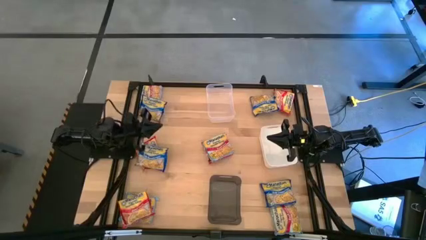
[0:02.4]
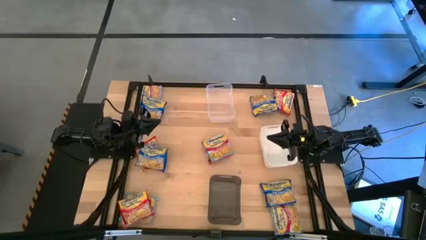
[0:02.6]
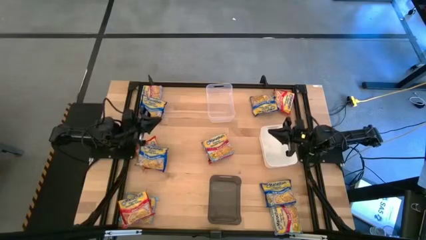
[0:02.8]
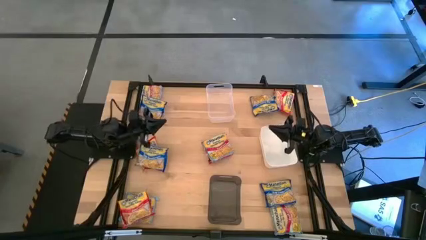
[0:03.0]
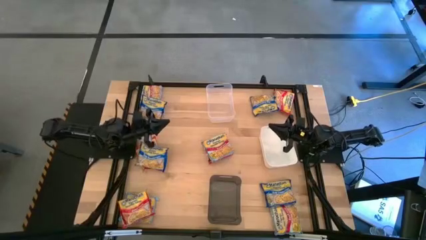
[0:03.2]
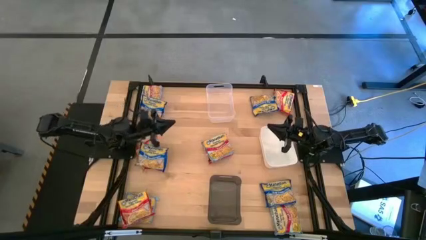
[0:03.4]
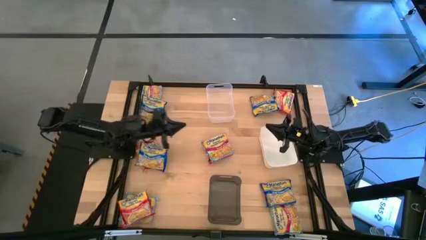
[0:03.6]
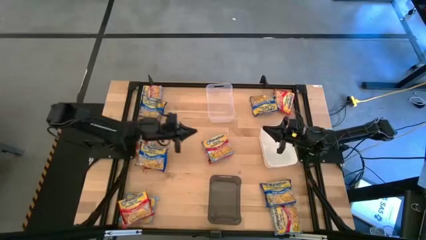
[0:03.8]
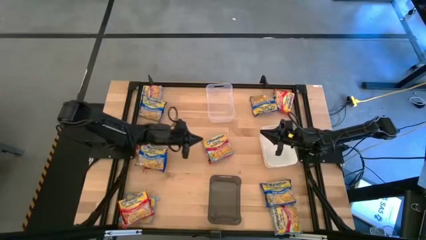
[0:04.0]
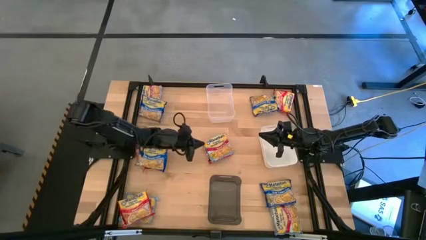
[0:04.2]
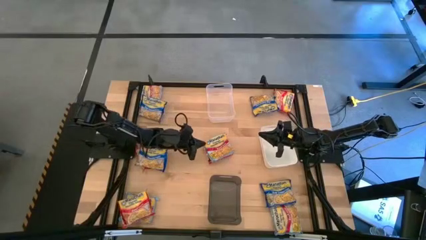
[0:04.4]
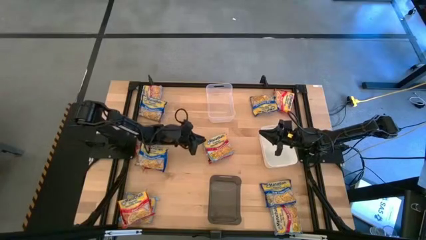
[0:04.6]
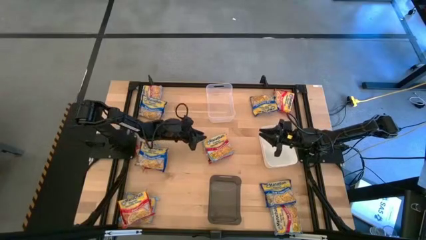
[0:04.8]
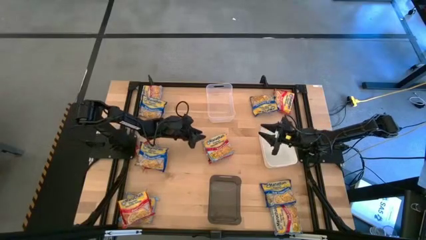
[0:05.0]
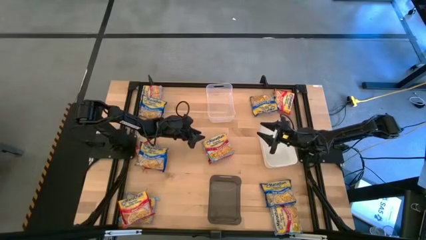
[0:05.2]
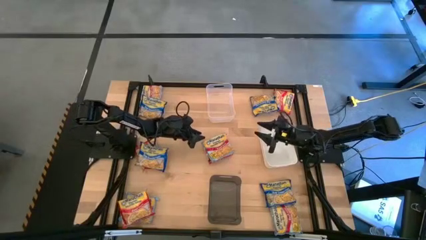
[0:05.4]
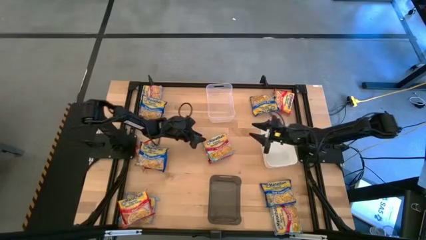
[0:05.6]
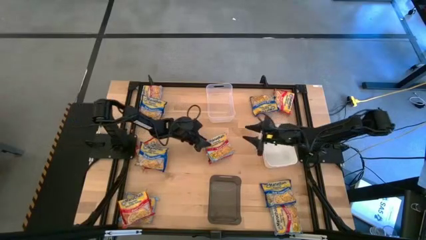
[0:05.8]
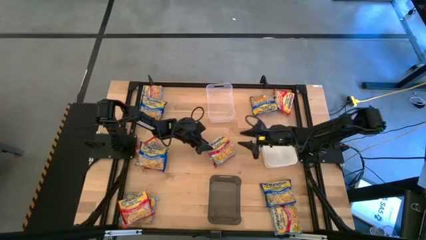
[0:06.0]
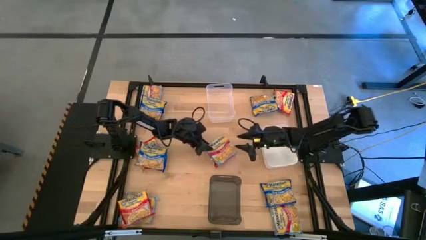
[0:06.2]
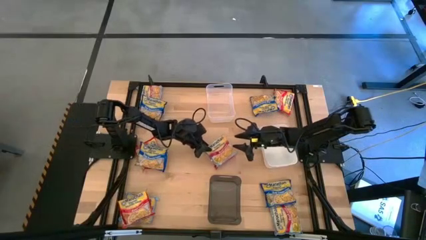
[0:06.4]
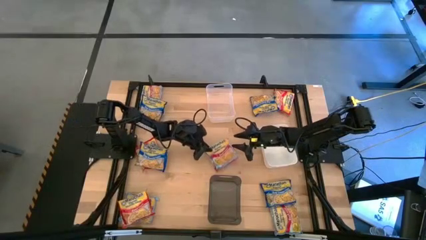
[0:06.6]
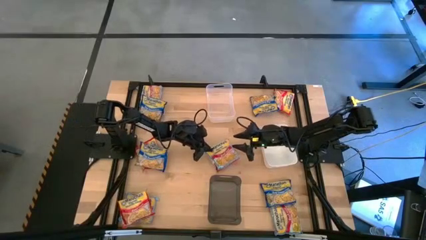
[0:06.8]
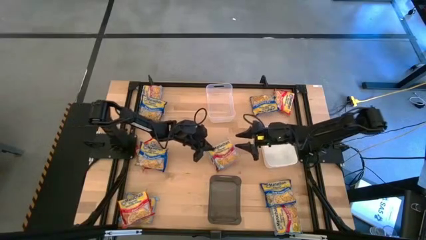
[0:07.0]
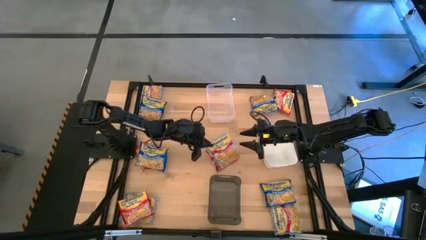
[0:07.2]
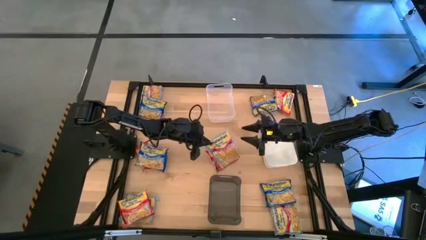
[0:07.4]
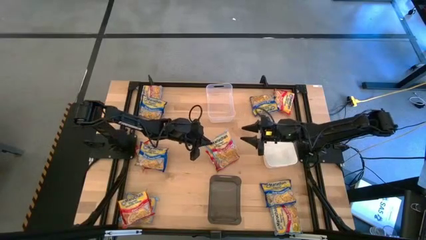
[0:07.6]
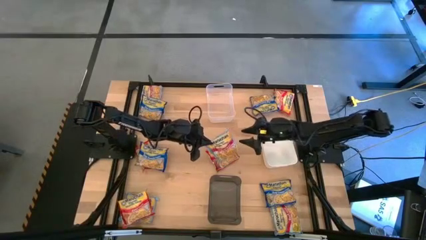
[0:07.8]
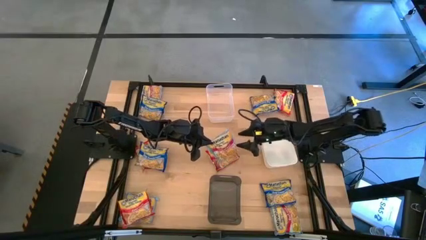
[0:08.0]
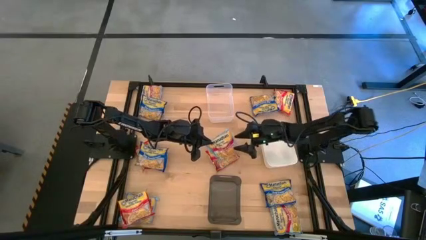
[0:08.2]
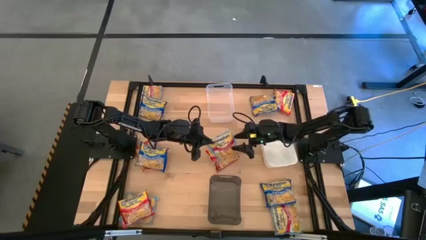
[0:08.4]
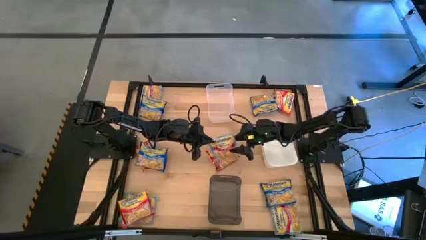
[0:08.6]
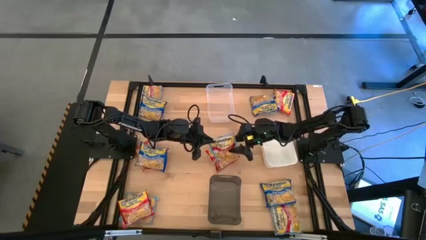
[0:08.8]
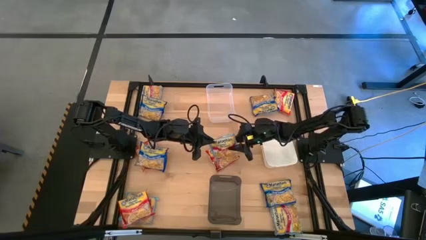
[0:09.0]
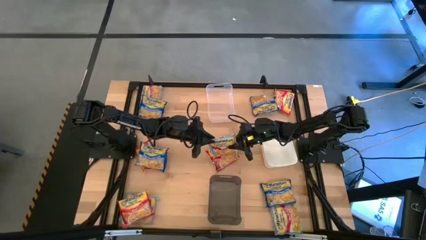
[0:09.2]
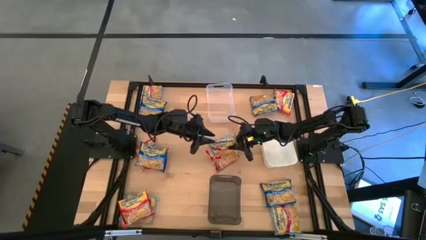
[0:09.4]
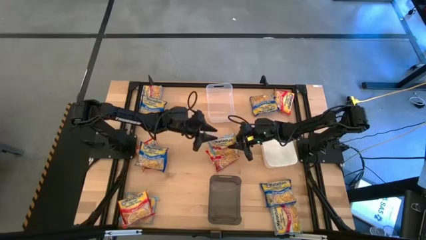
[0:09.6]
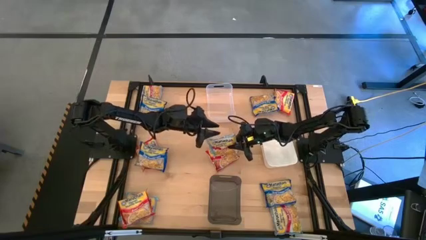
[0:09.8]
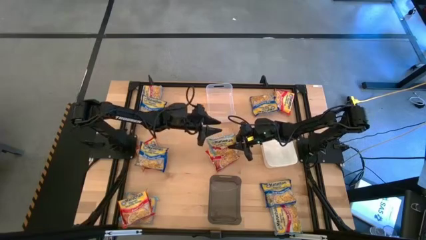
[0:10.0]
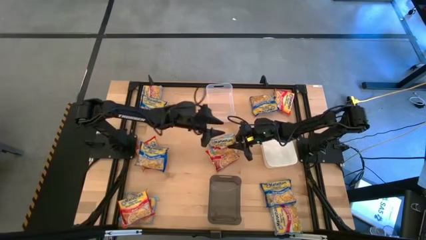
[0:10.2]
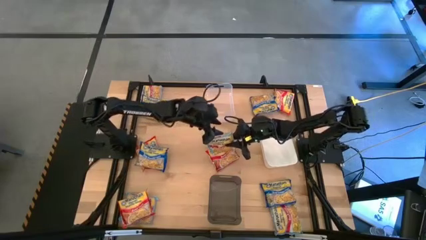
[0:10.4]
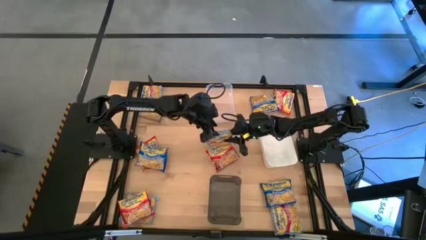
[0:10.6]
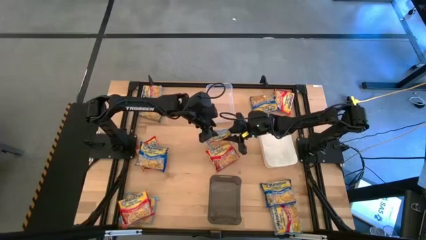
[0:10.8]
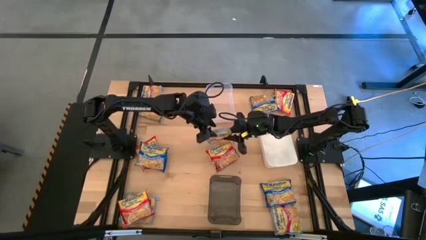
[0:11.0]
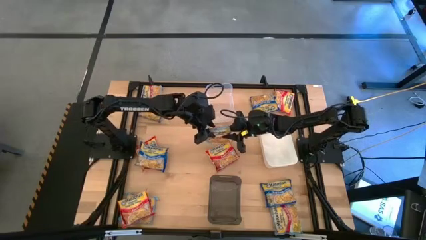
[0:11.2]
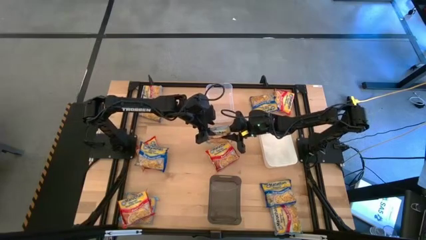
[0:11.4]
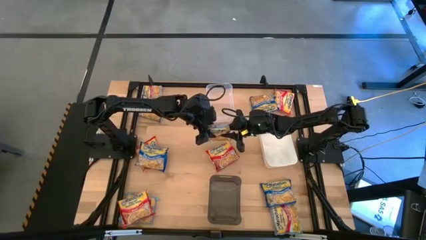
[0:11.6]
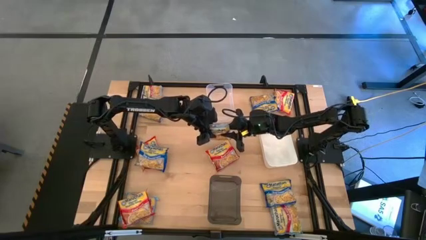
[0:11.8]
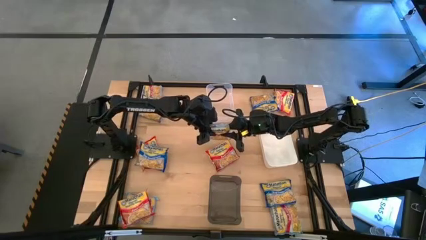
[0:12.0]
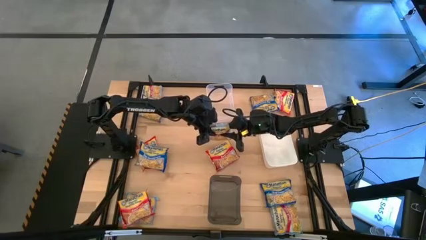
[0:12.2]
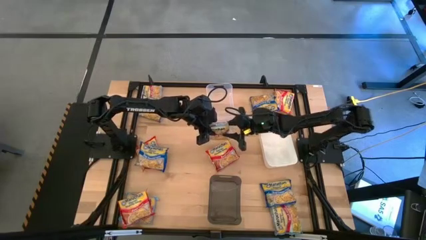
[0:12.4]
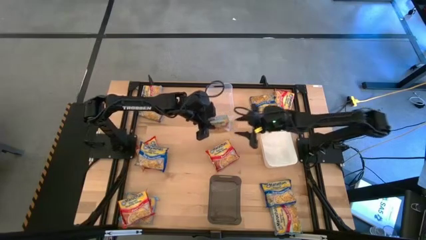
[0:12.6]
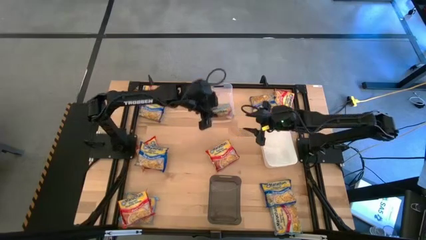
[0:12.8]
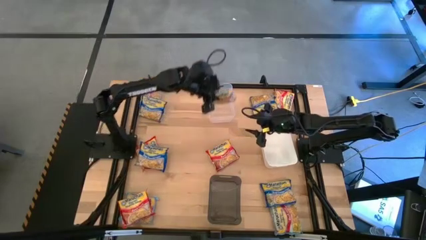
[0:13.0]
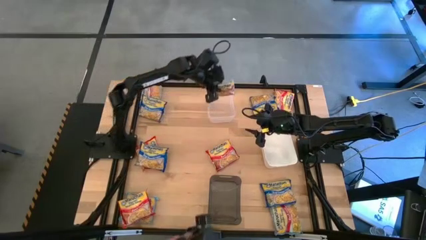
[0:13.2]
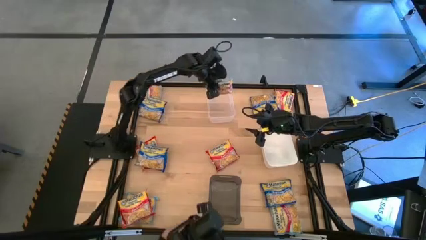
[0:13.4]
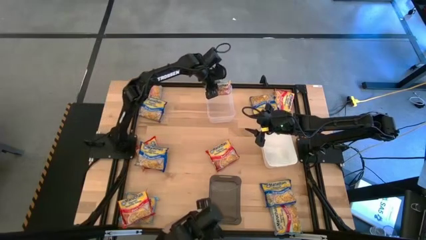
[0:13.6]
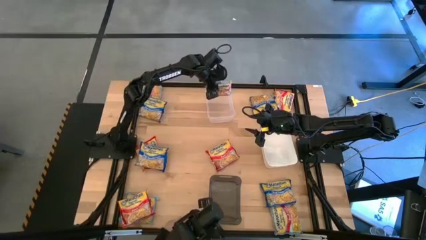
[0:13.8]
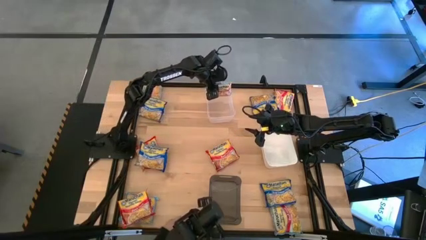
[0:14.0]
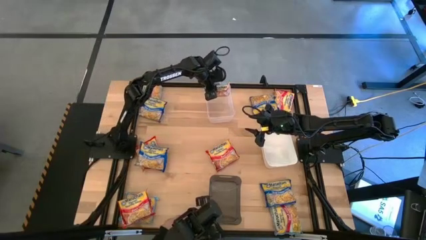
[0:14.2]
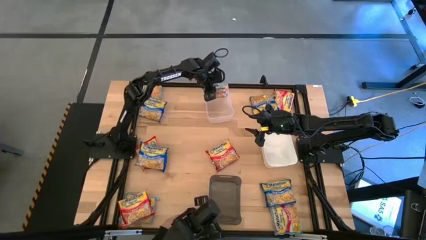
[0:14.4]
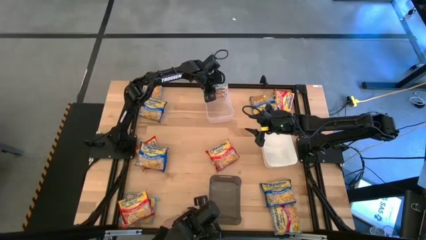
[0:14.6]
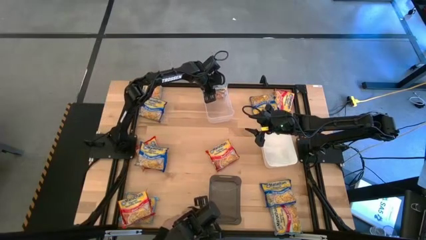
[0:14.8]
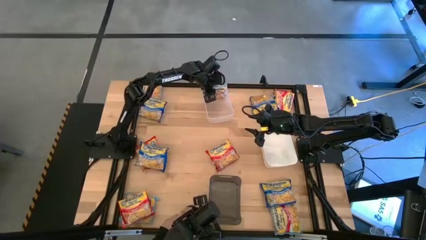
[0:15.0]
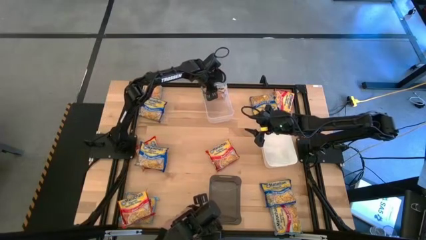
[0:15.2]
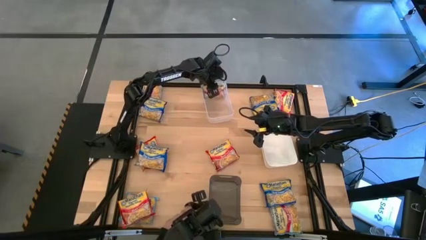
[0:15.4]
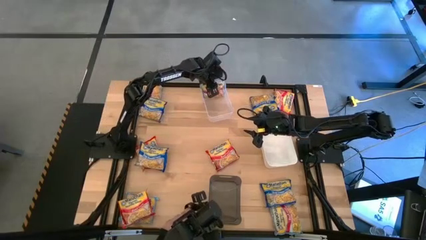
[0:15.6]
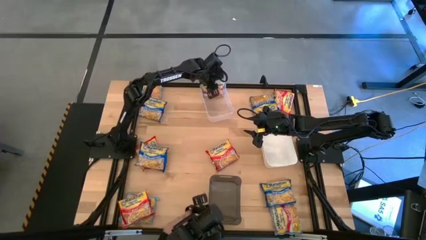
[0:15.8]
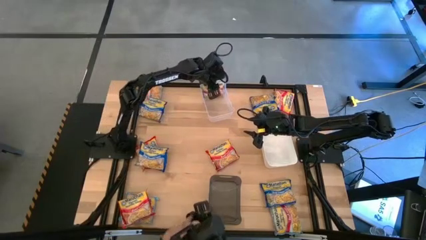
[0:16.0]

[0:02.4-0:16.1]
Task: Sort Maruchan noodles
Put the center light blue noodle pack into the transparent bin
